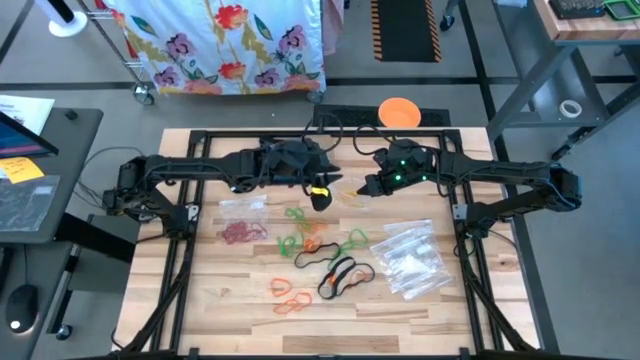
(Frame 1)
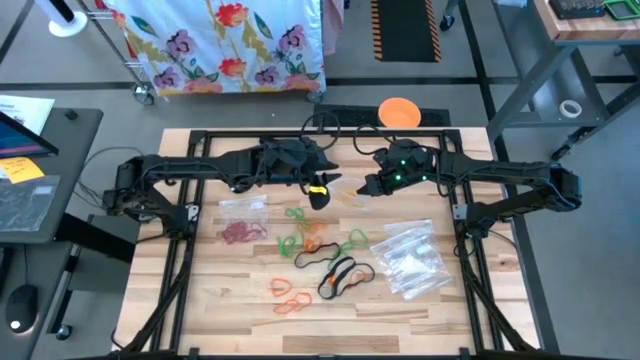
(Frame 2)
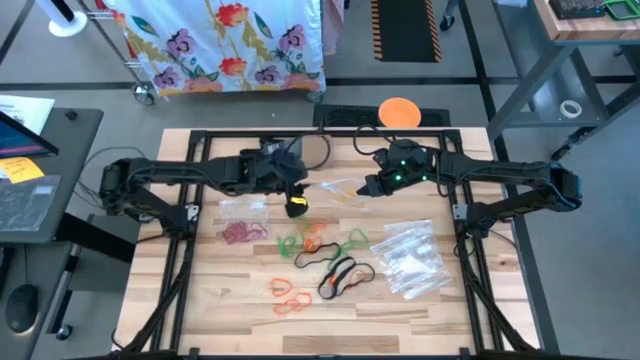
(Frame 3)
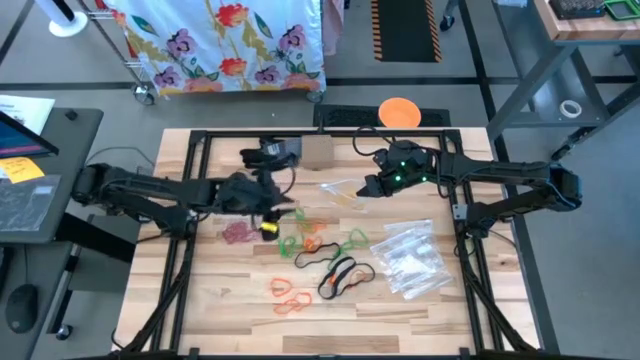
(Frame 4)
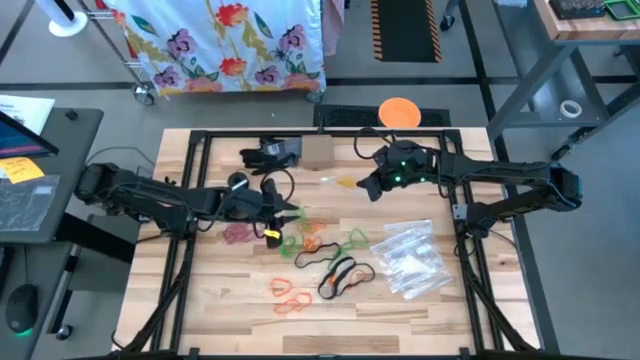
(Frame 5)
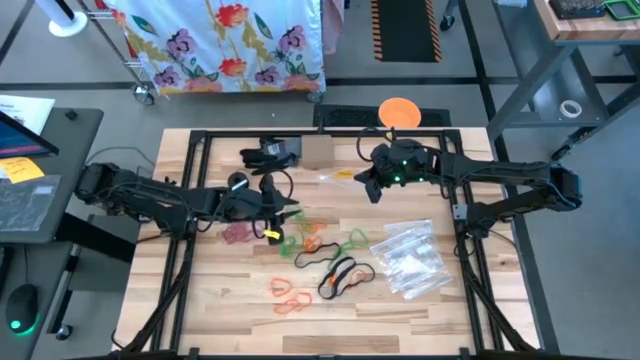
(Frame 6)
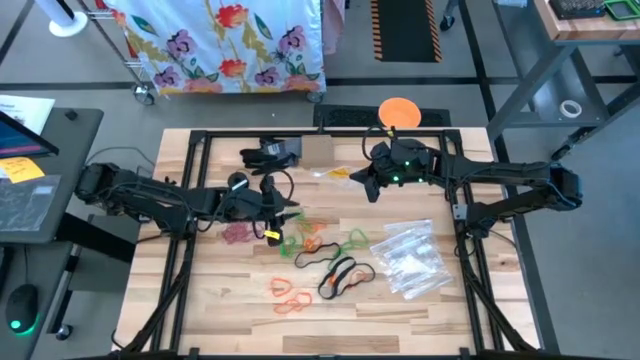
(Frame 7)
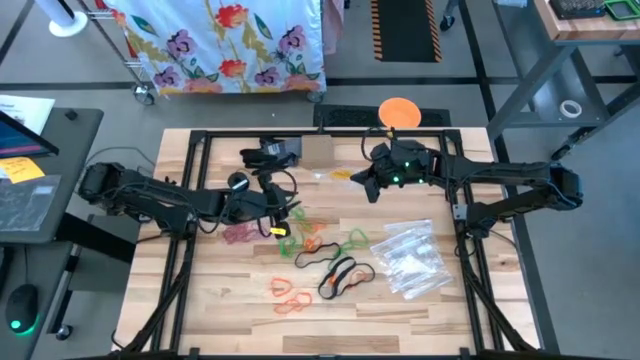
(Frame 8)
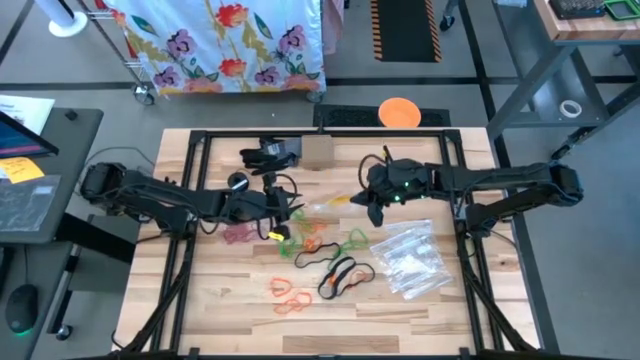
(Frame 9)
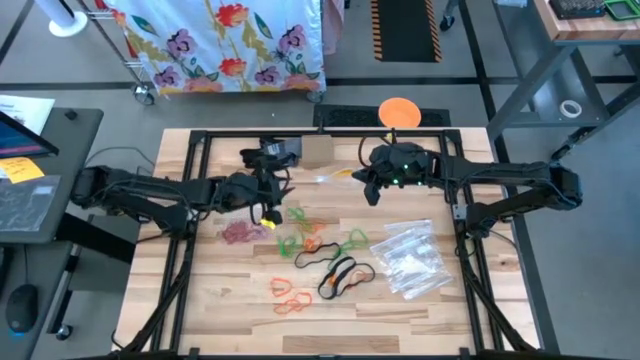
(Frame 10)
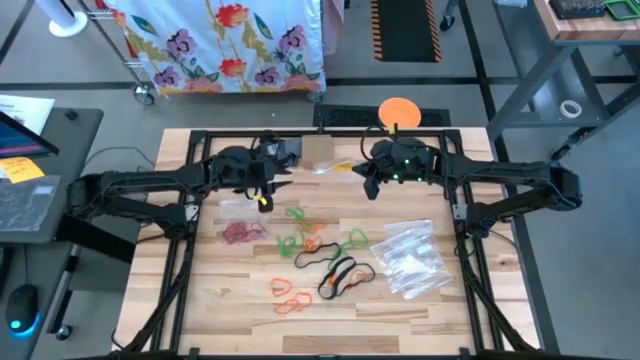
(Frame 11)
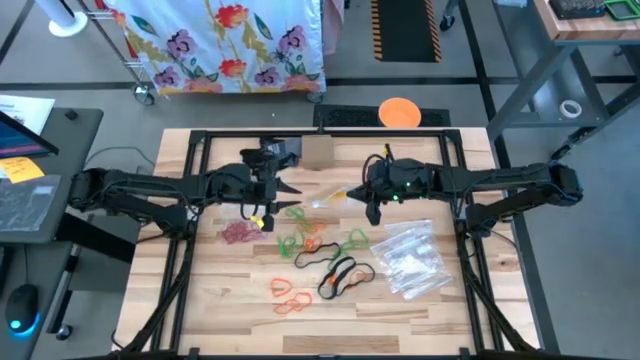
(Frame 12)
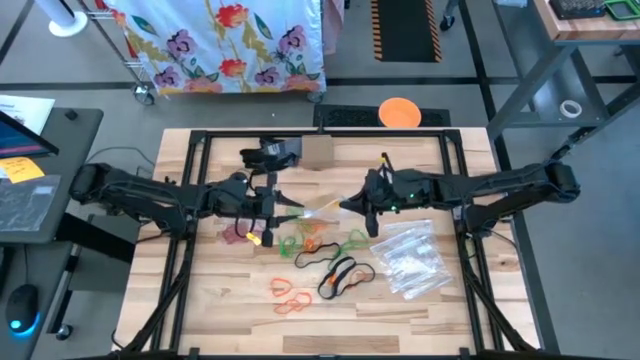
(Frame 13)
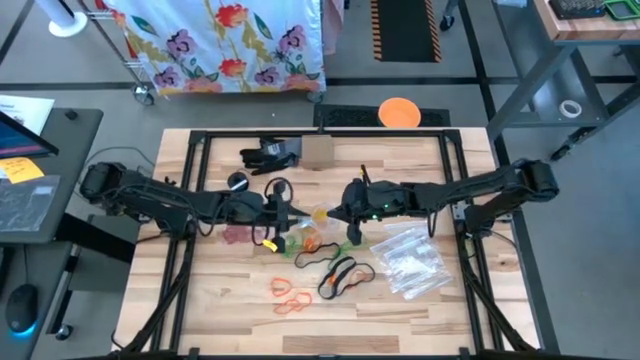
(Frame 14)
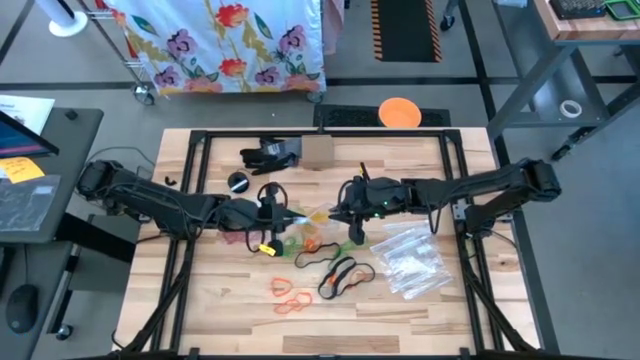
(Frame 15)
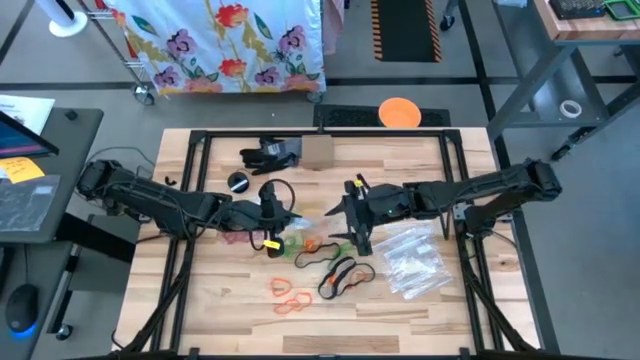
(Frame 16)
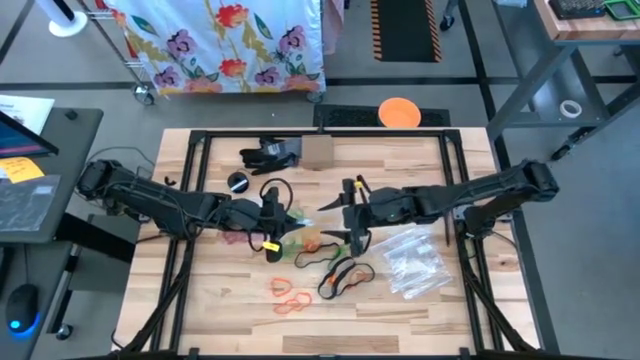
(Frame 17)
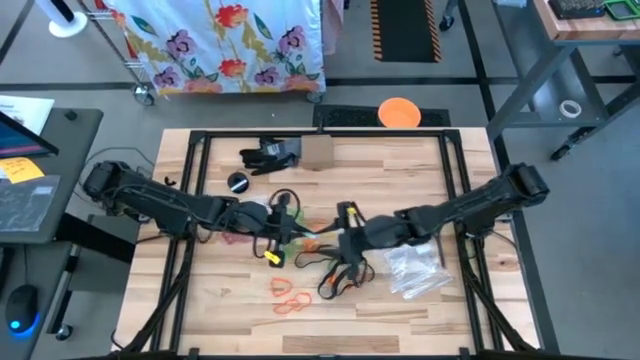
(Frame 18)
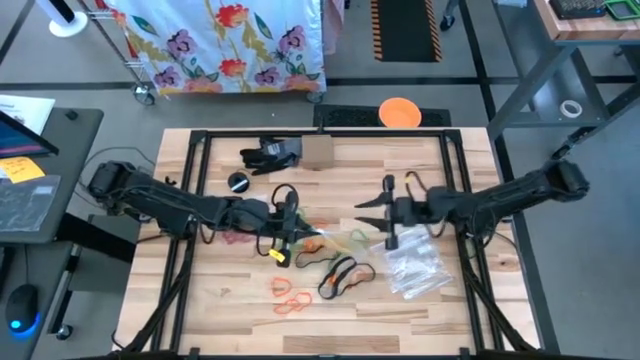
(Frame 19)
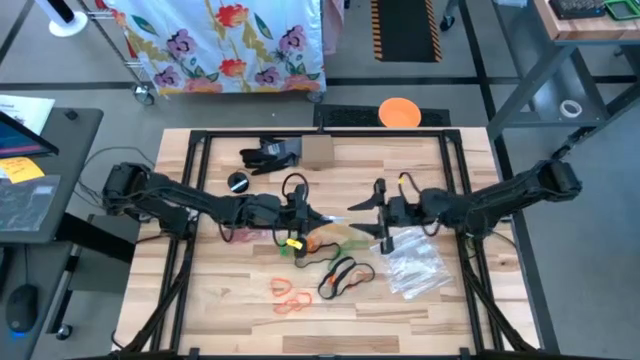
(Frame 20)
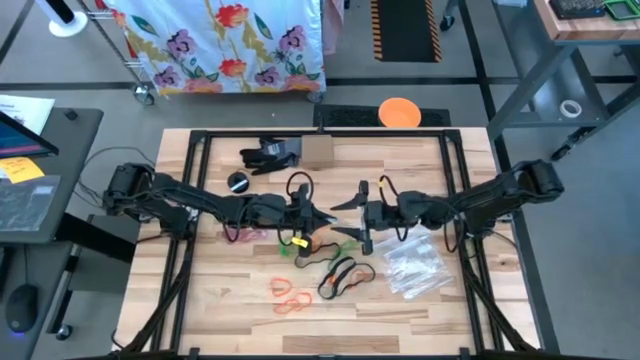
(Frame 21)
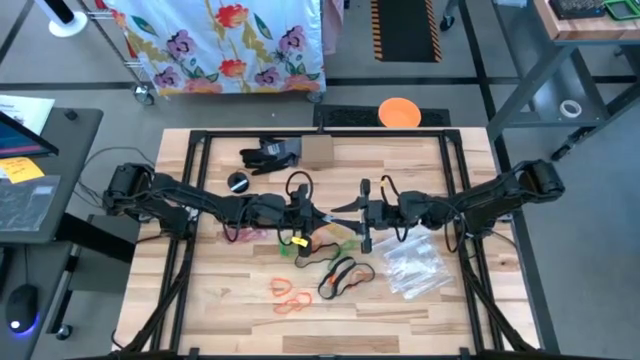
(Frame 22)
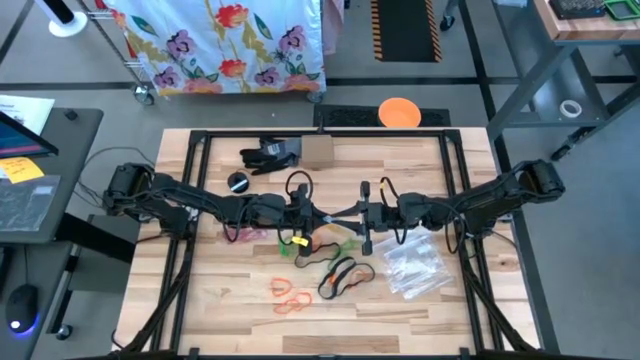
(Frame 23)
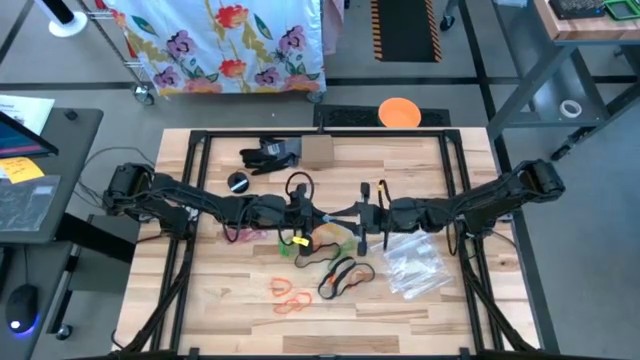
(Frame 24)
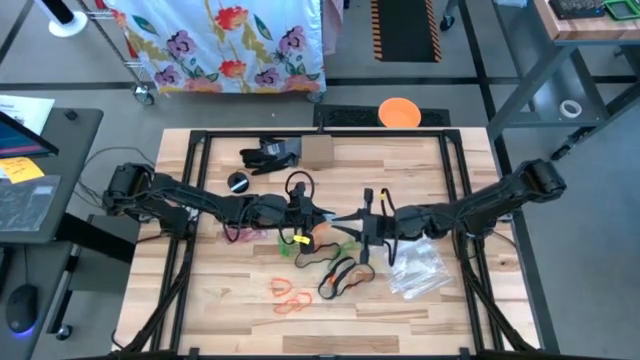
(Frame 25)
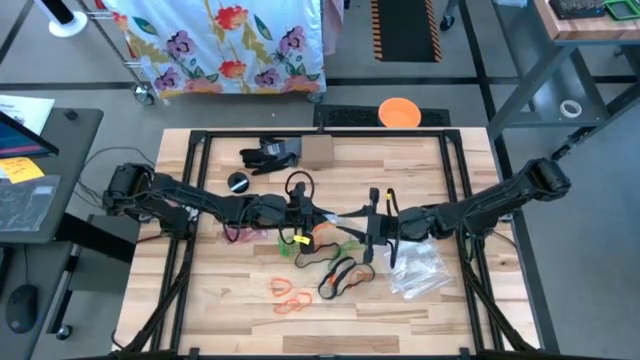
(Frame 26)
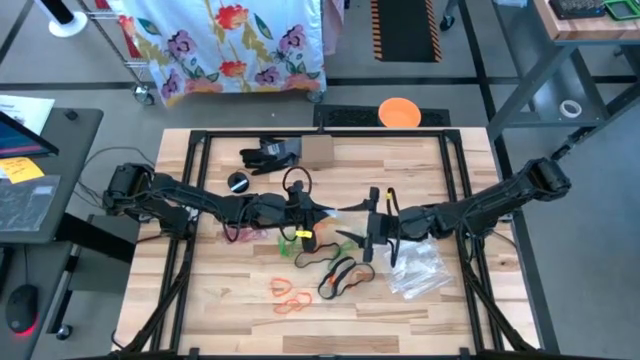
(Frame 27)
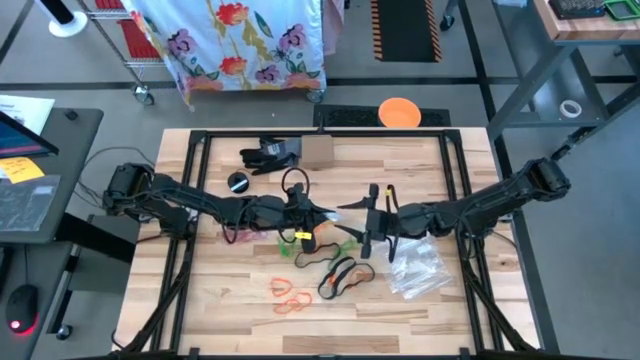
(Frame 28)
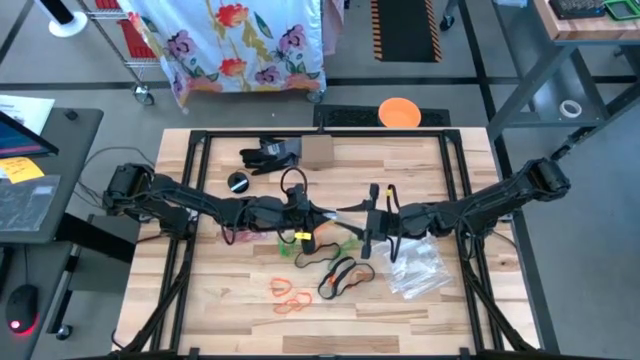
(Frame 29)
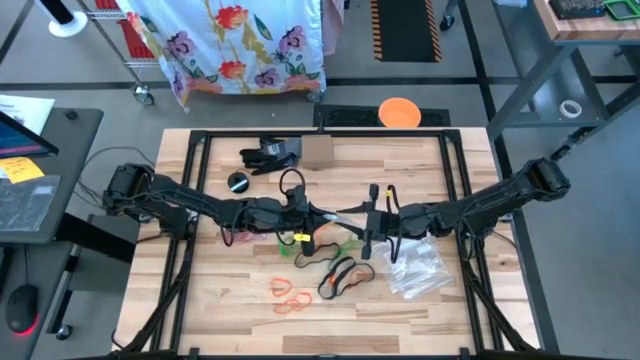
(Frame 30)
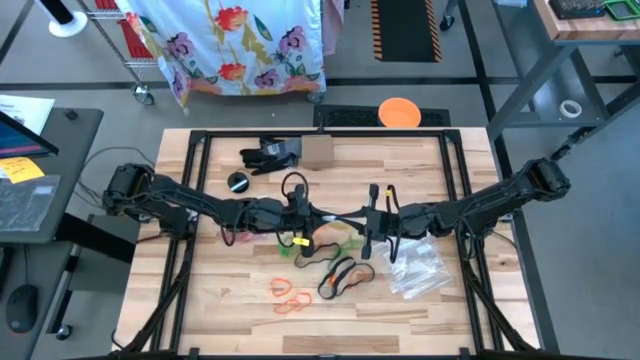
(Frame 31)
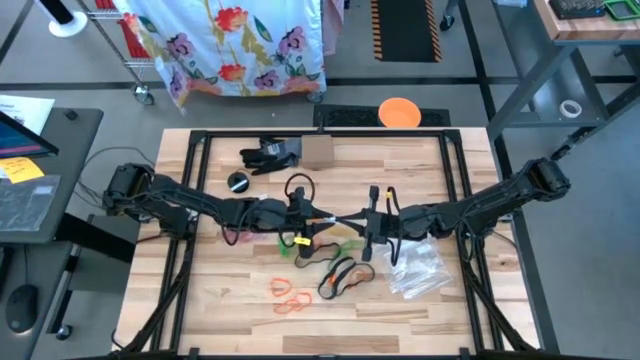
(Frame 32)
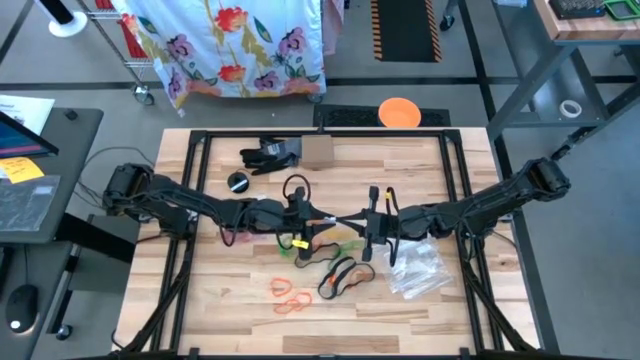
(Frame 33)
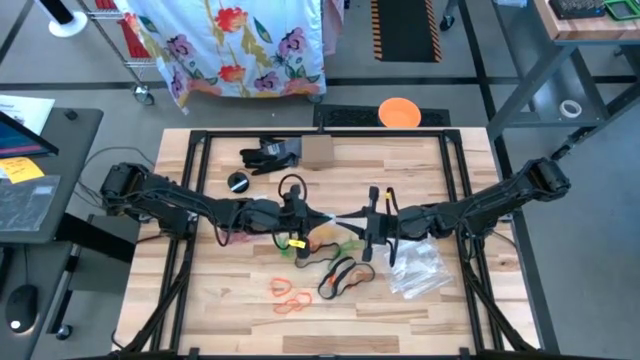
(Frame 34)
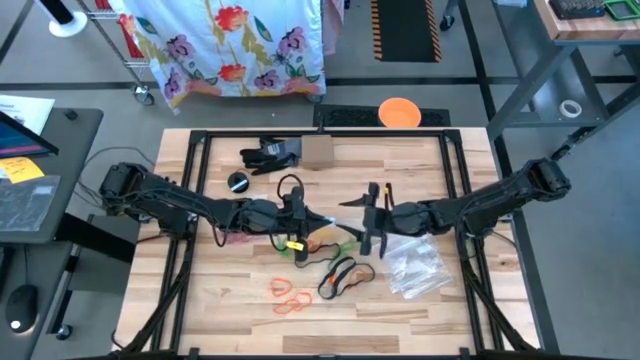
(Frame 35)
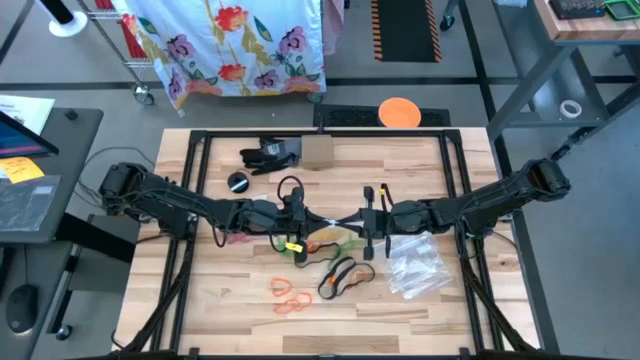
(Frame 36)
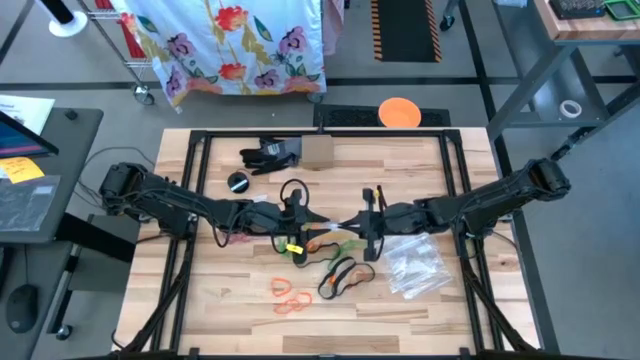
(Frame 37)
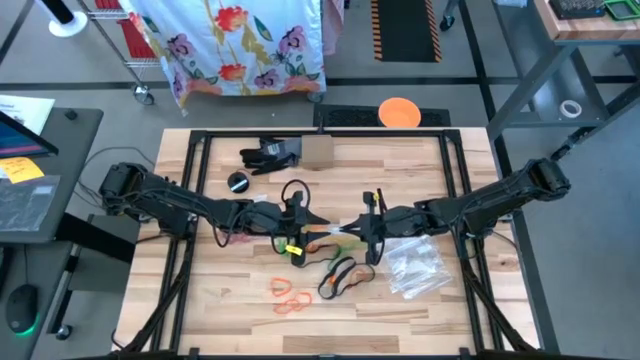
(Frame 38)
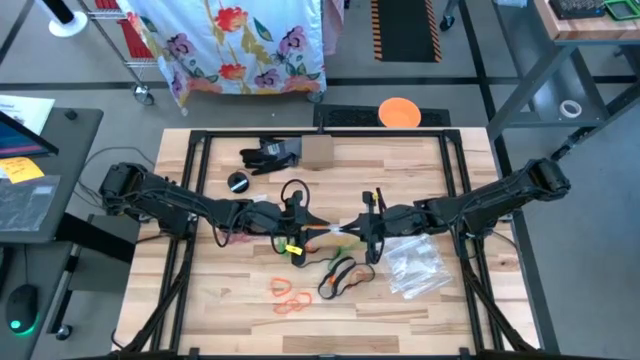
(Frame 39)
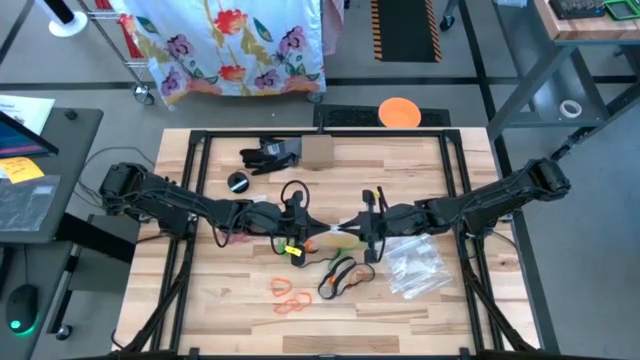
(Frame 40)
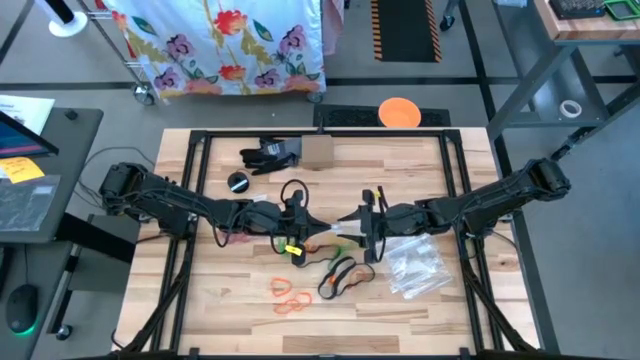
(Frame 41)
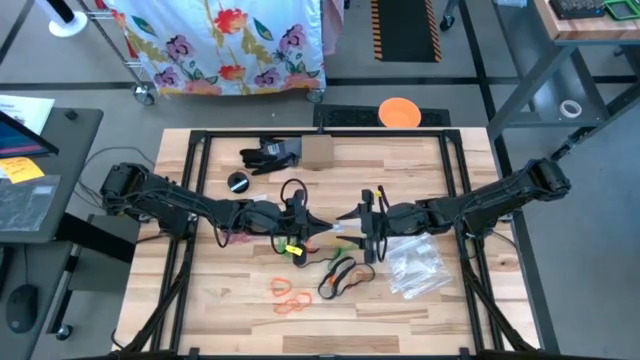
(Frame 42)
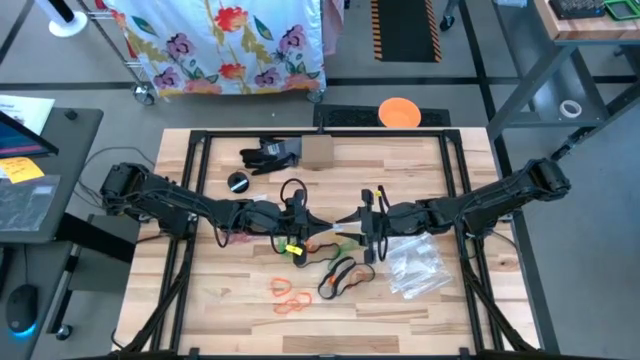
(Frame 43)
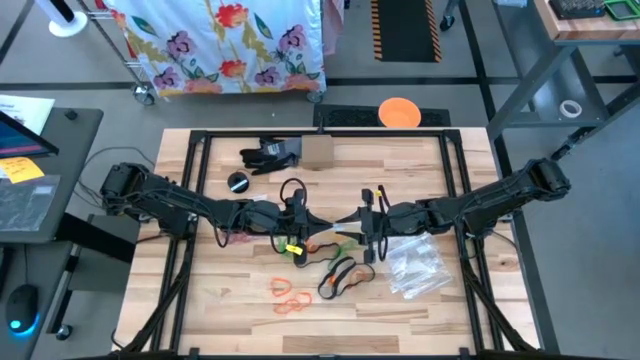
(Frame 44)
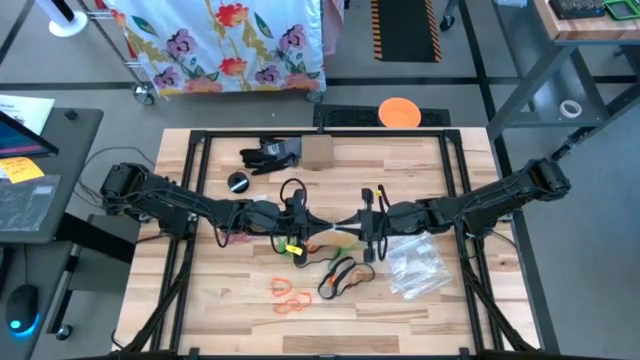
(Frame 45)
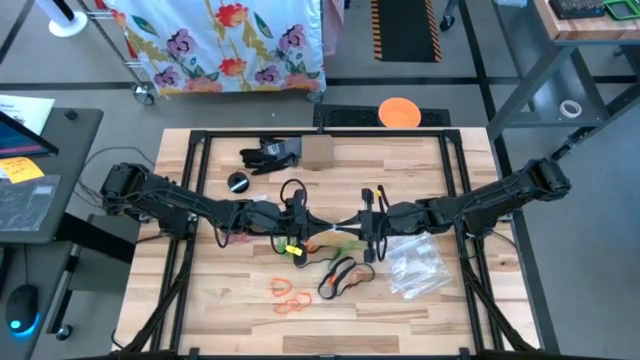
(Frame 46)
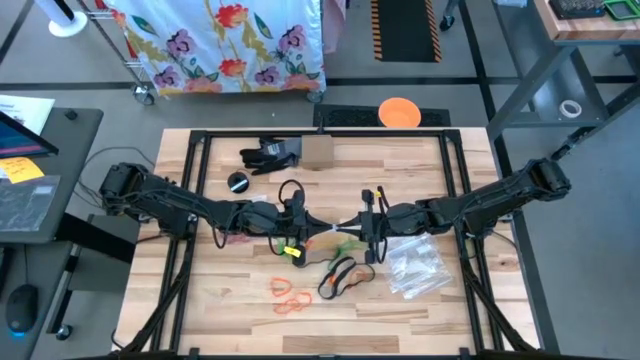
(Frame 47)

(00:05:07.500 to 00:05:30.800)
Task: Sort rubber bands
Close the transparent zip bag
